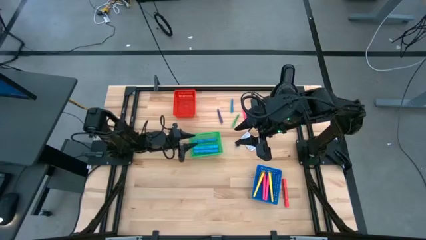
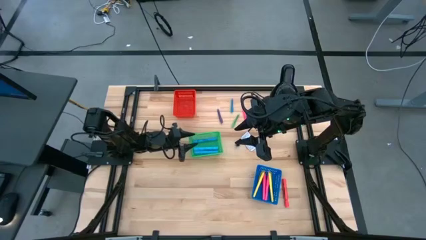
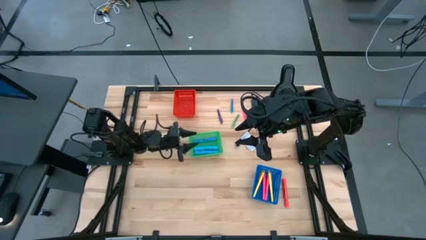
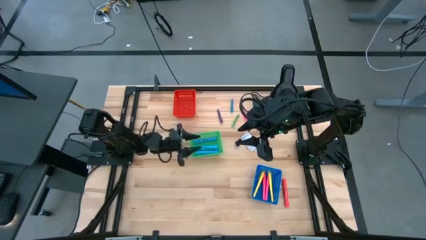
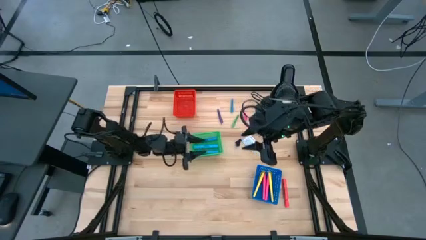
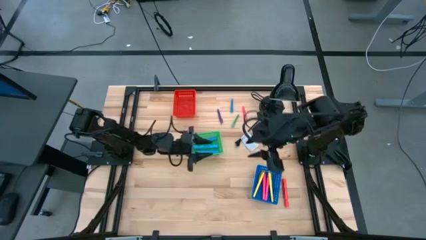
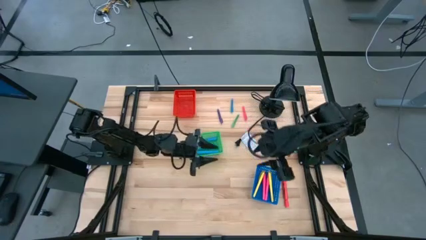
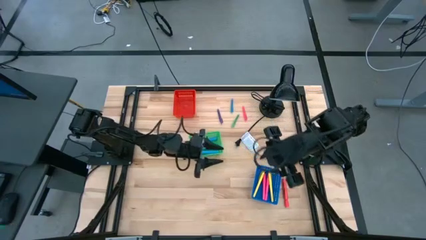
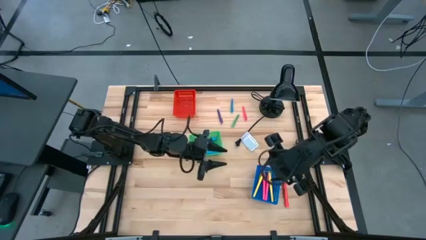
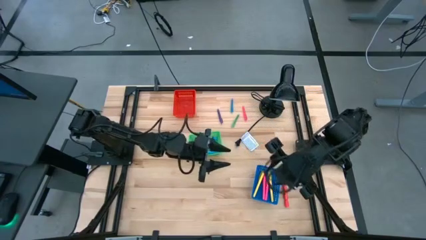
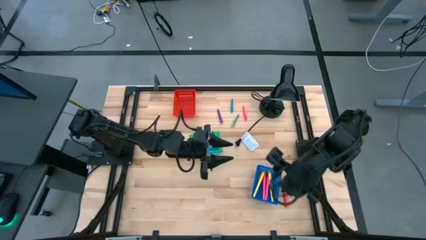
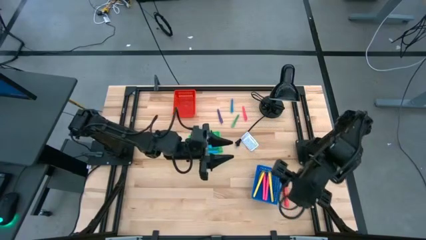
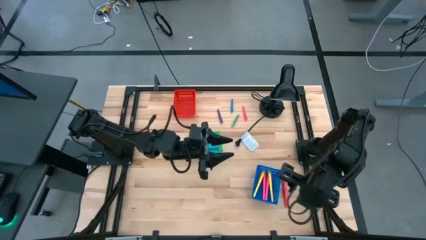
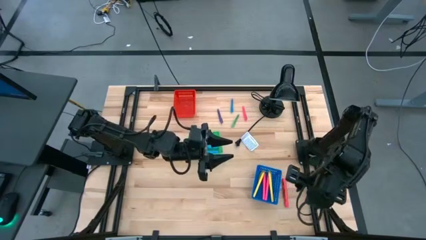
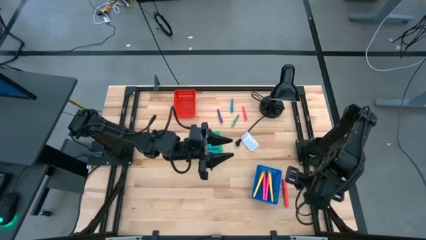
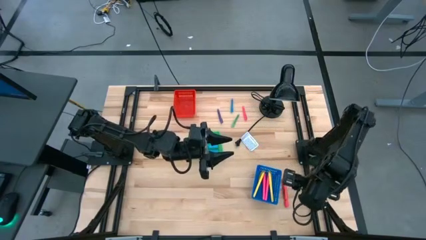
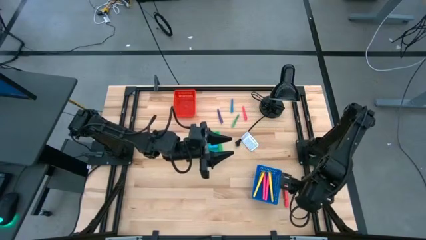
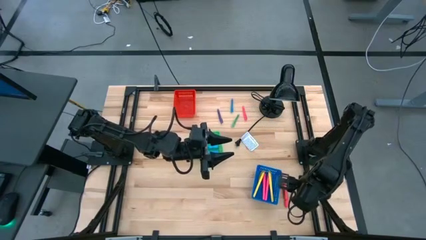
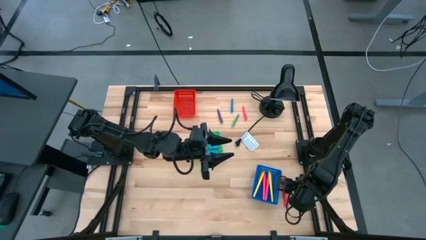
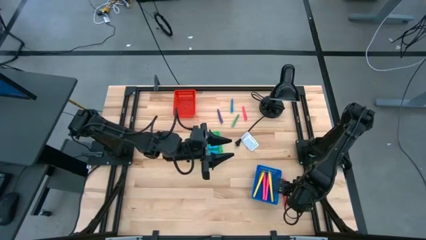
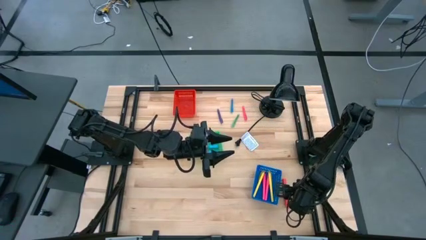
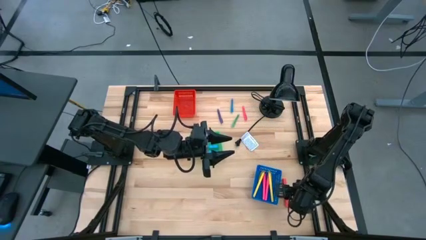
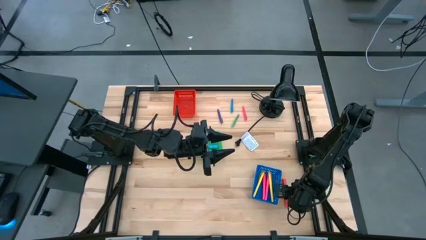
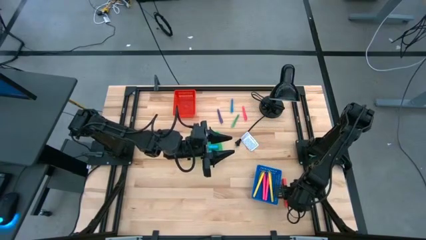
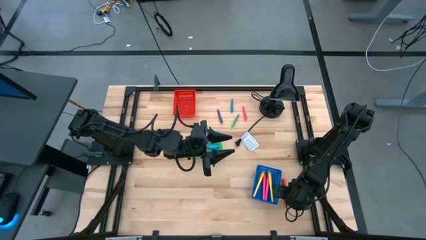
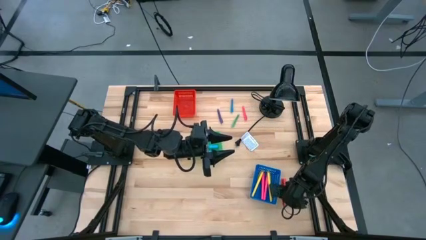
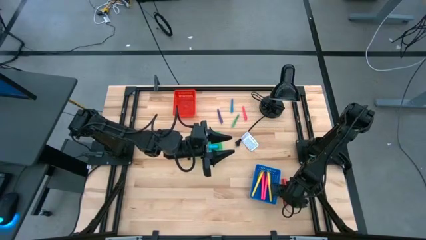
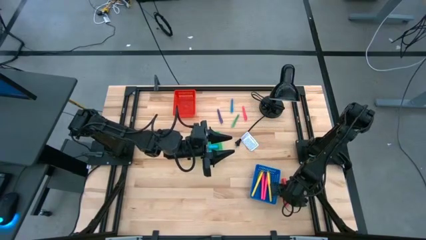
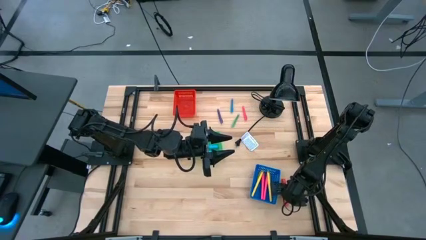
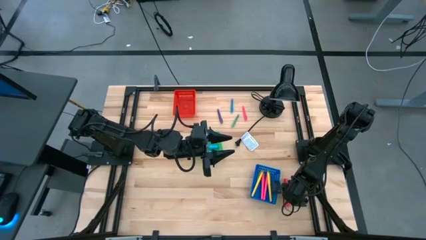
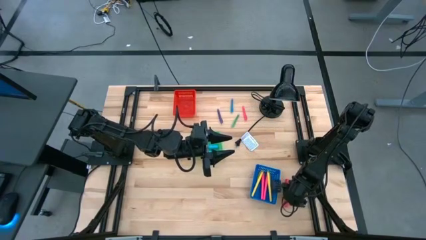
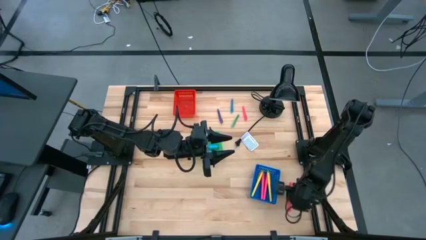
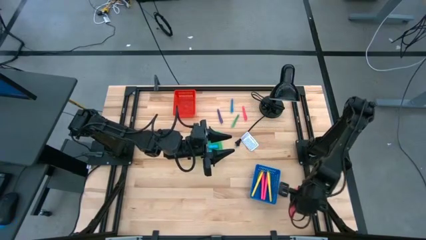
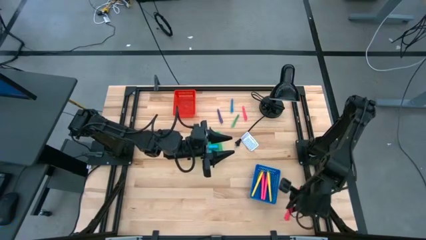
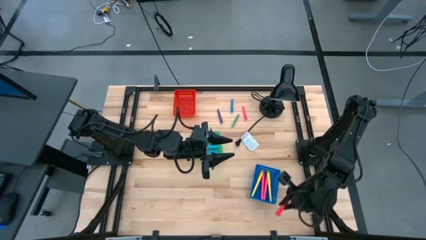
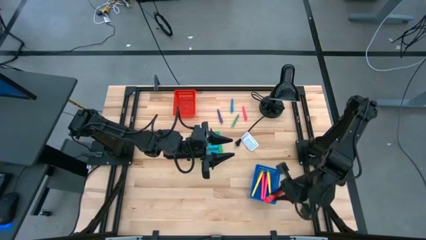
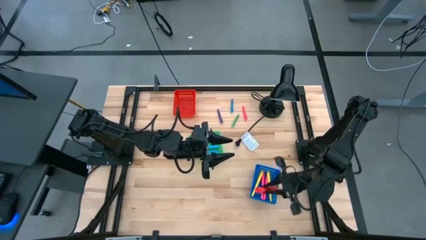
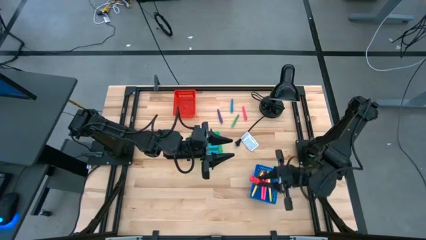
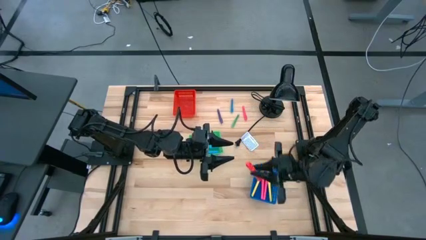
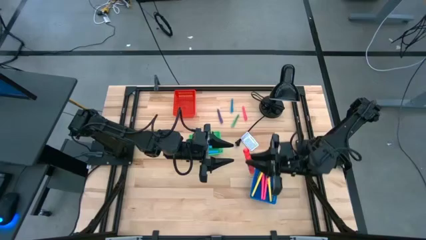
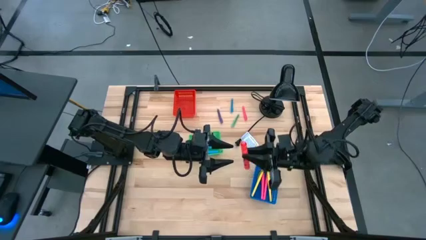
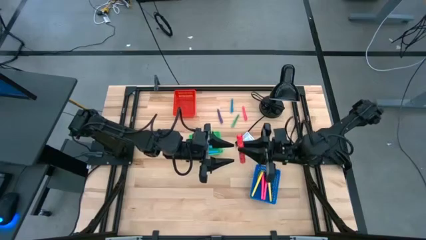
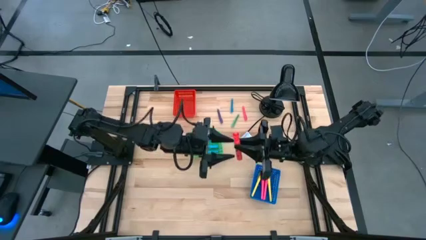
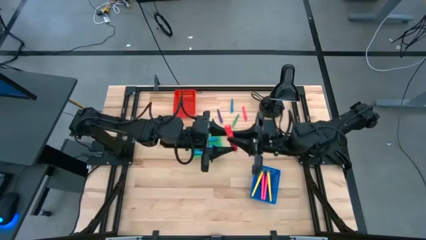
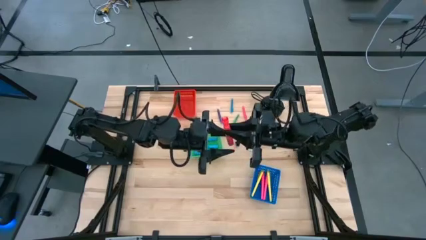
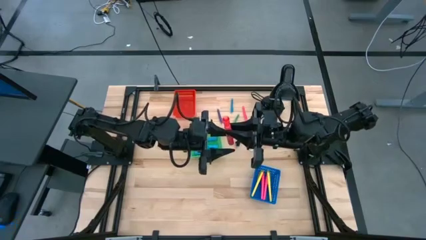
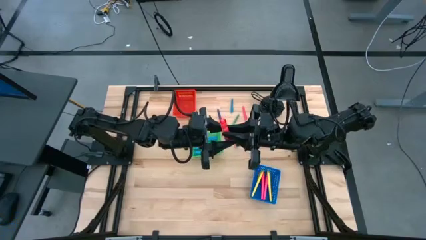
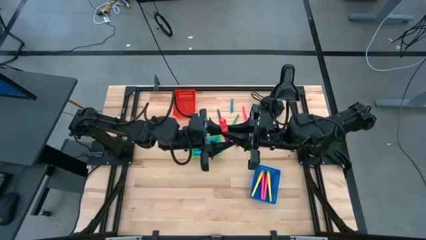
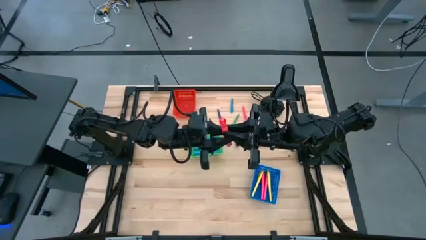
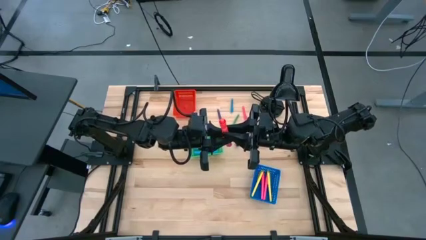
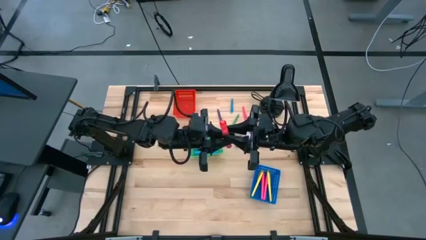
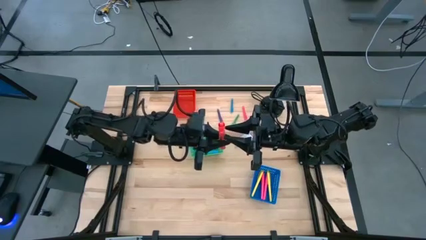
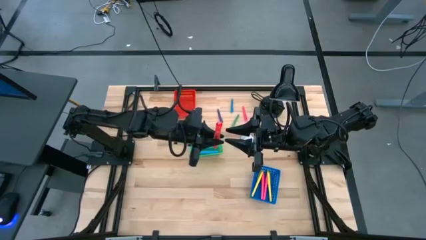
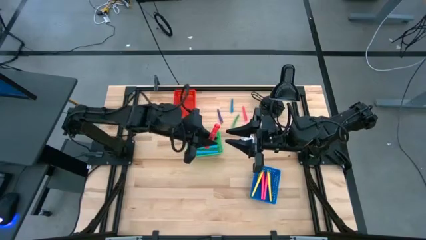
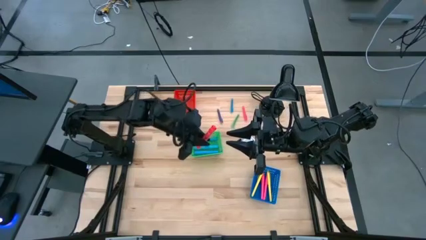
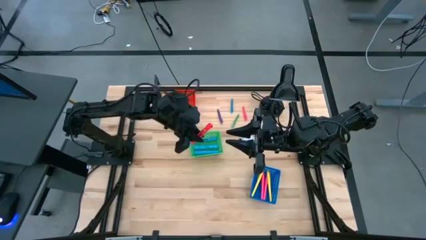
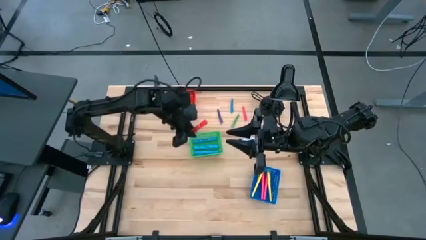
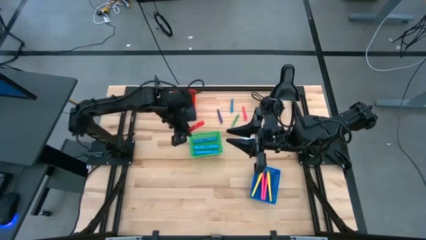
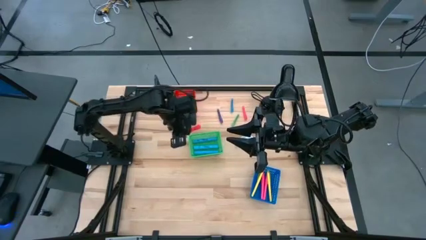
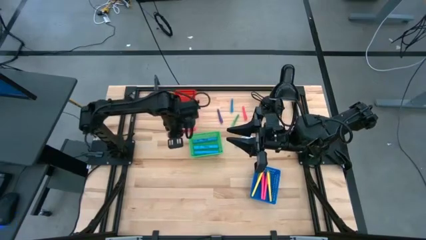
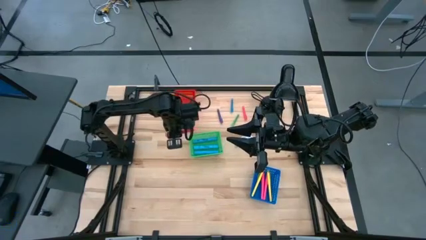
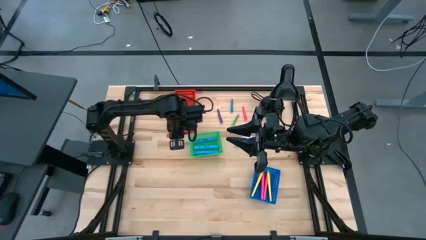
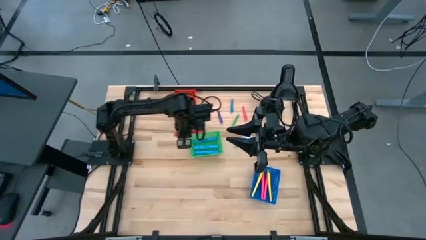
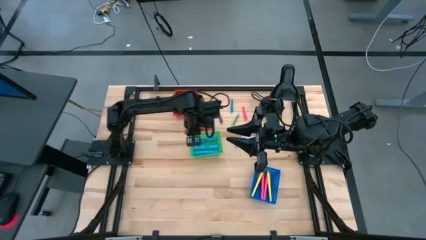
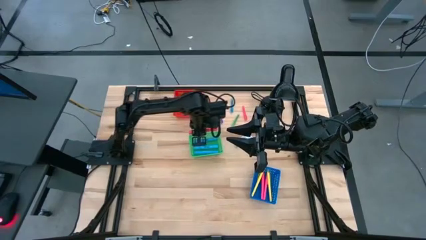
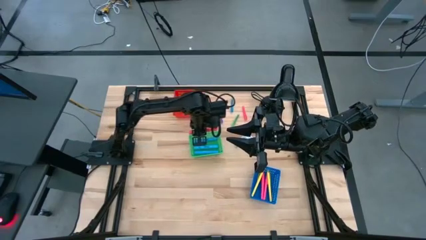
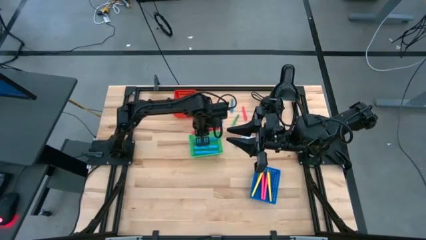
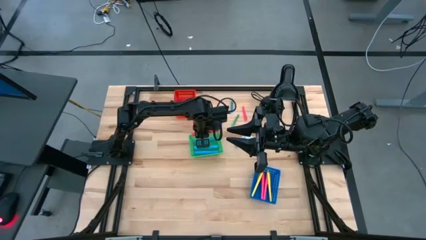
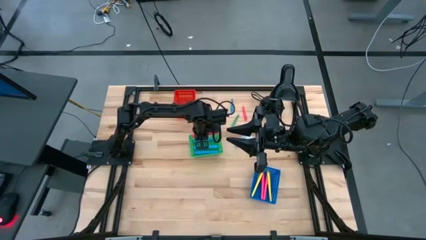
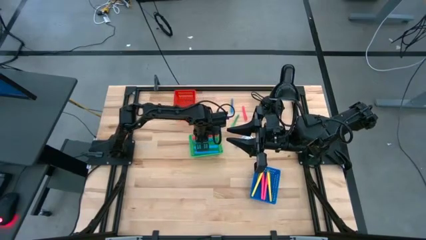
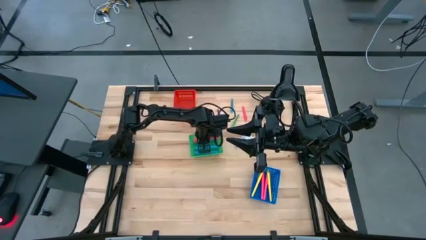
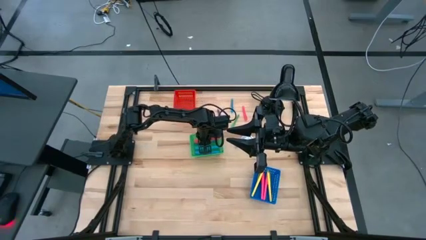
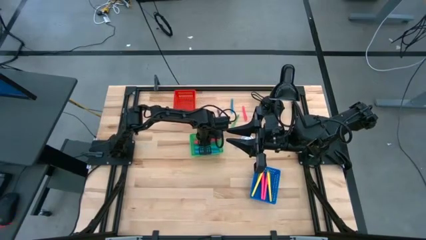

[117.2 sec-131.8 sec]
Task: Pick & Place Markers
Put the orange highlighter pen into the green bin

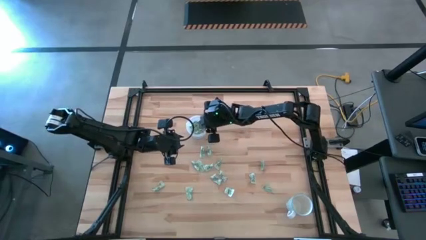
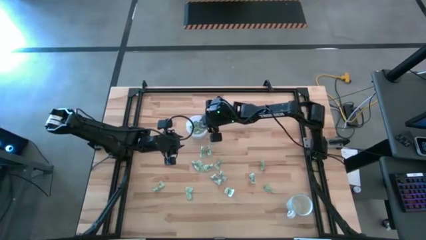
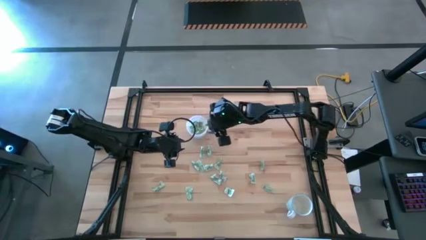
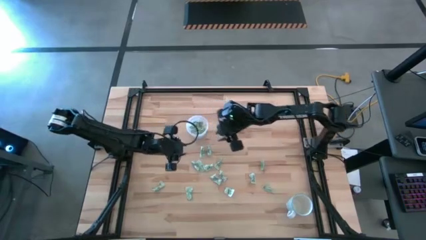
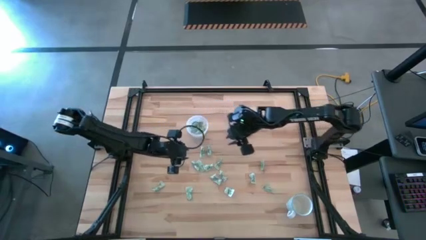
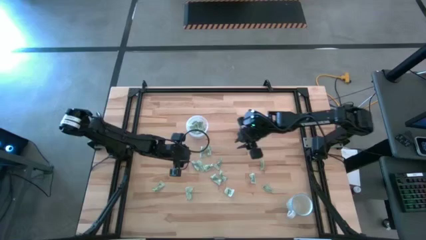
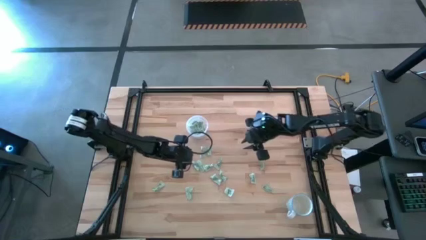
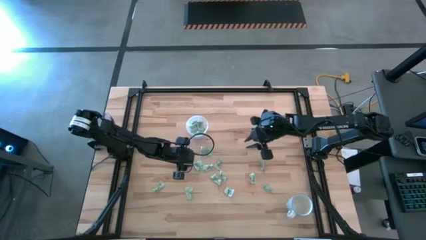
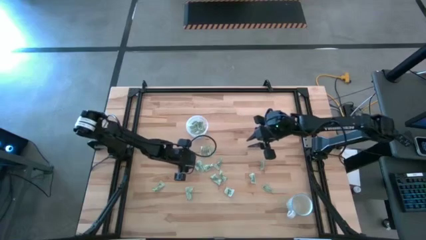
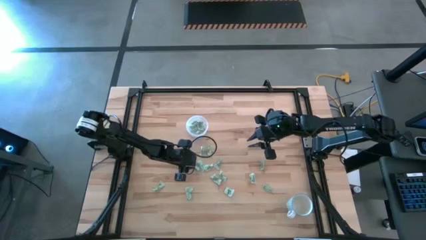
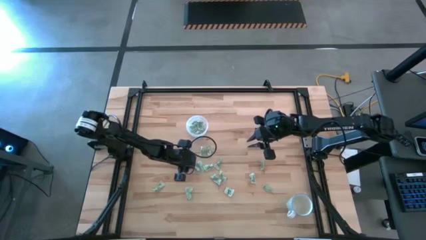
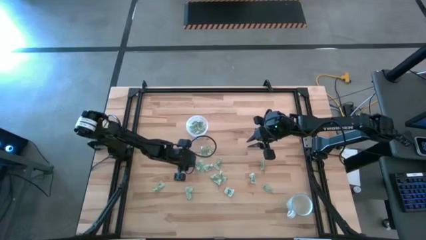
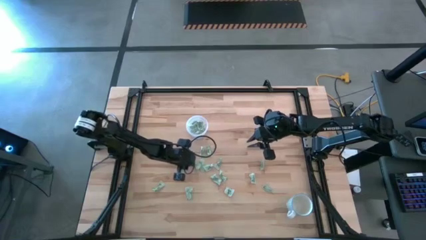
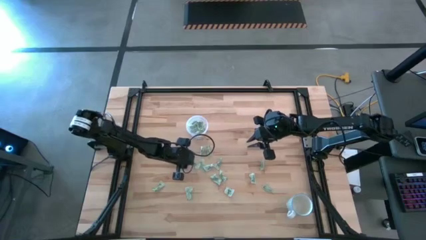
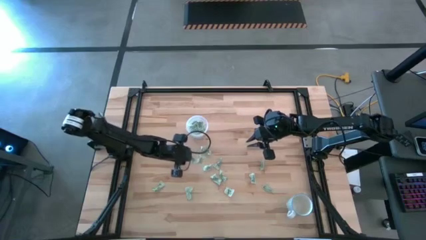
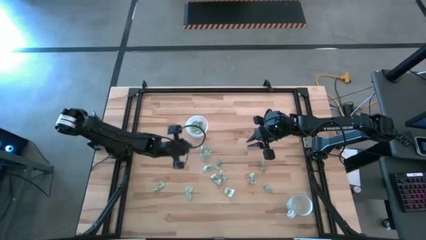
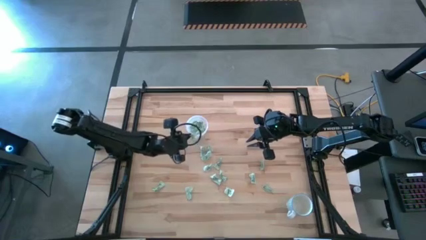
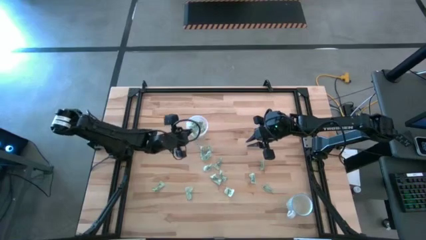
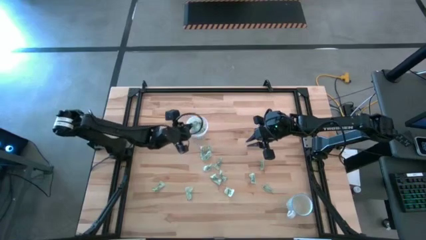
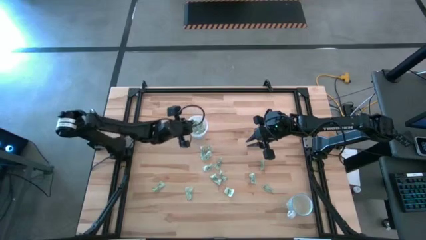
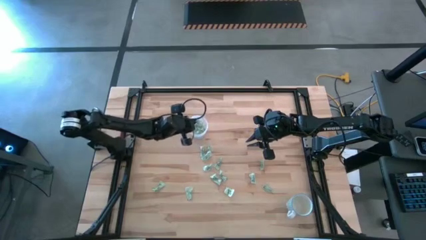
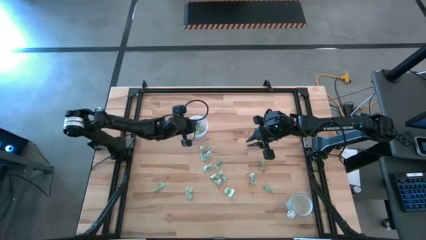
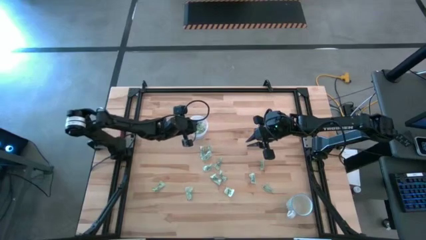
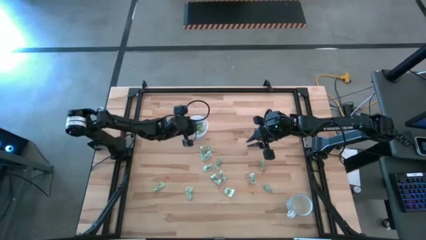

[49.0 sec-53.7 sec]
Task: Pick and place Stevia / Truvia into bins
Put the stevia packet into the transparent container
